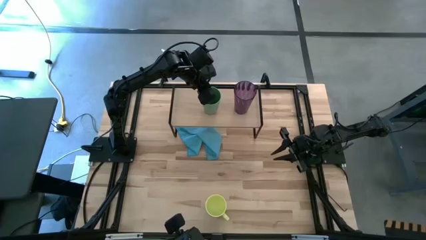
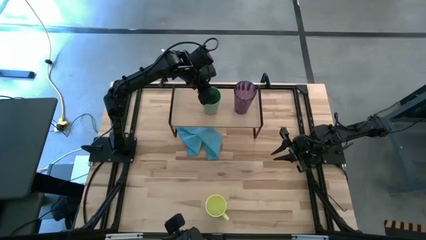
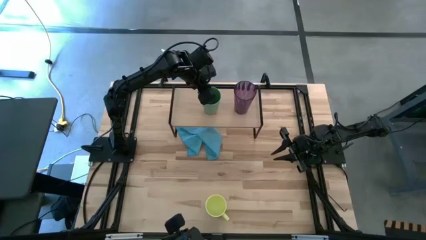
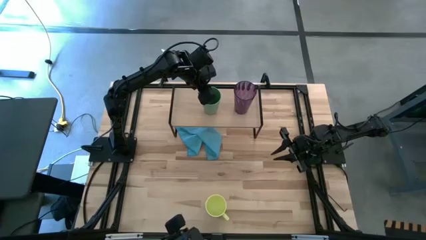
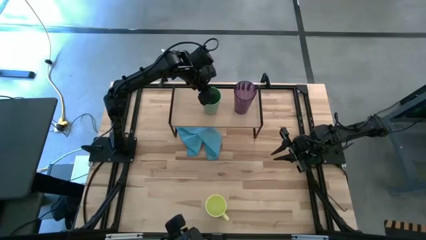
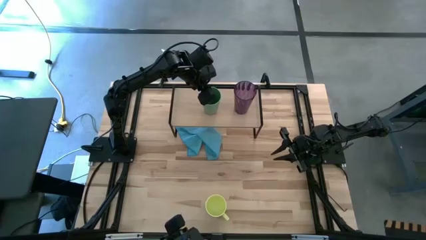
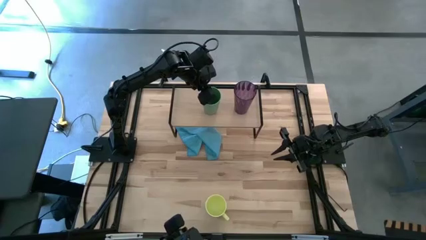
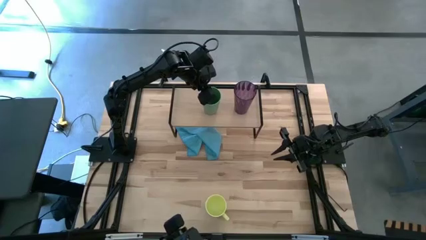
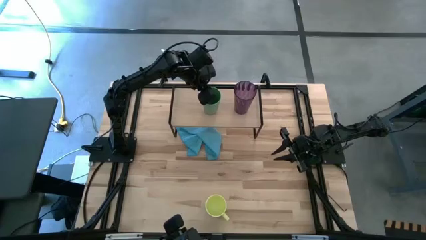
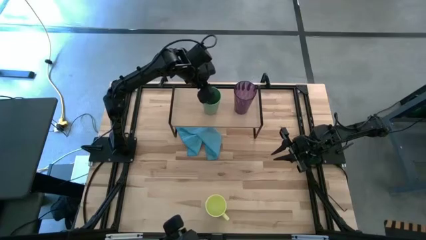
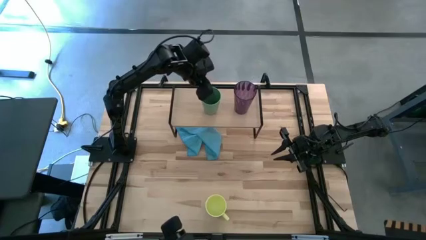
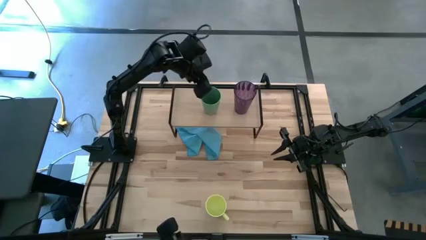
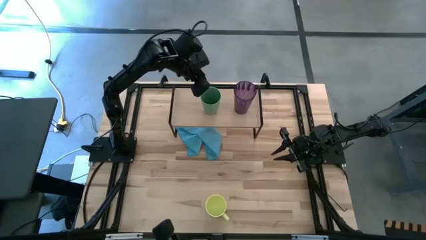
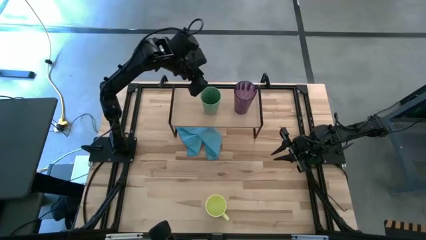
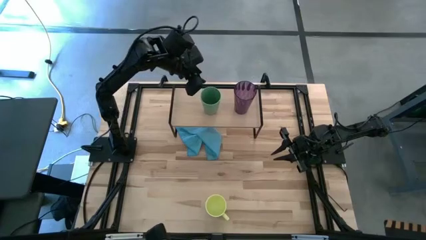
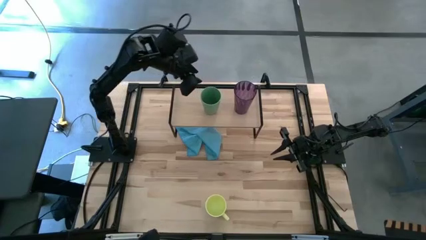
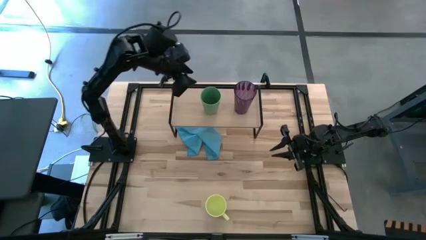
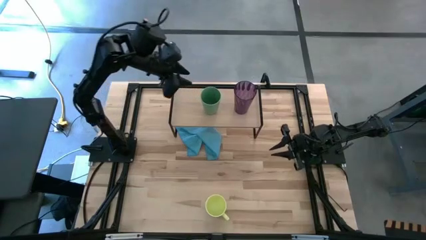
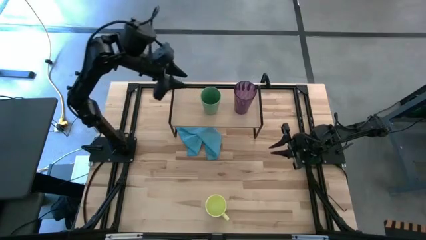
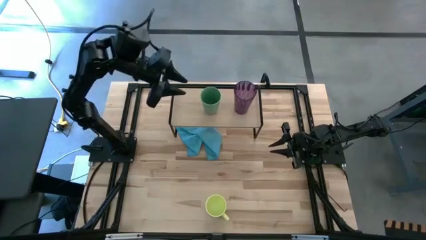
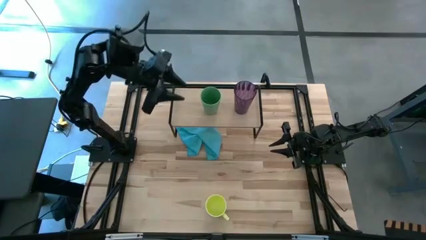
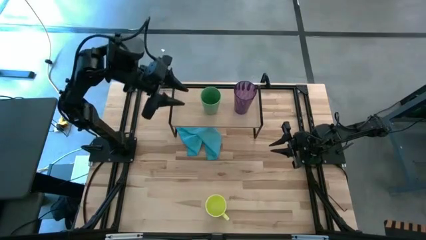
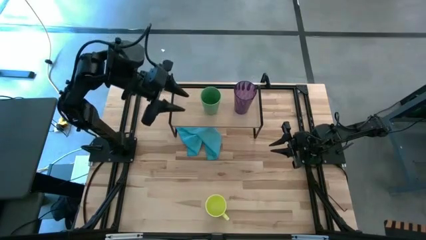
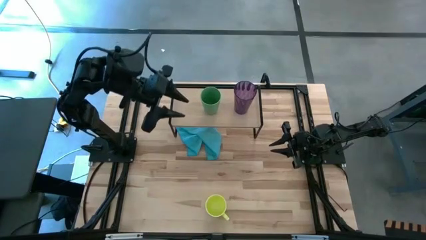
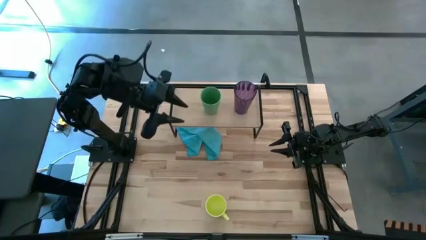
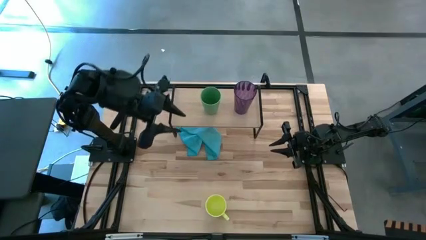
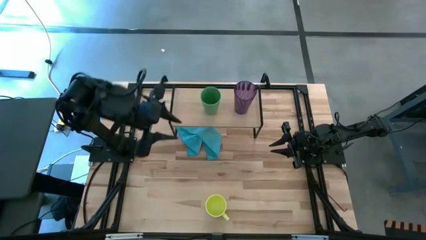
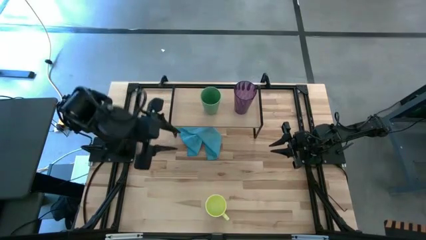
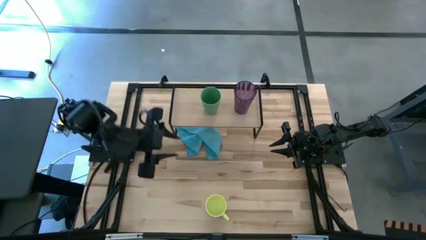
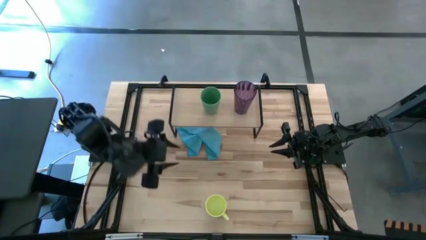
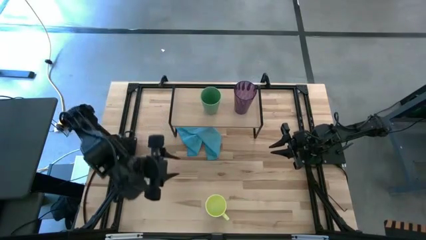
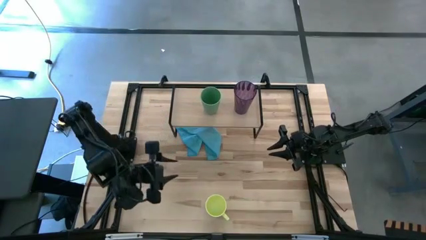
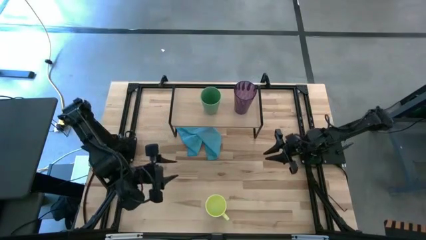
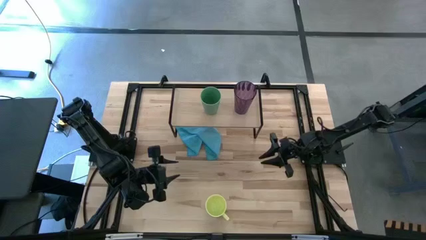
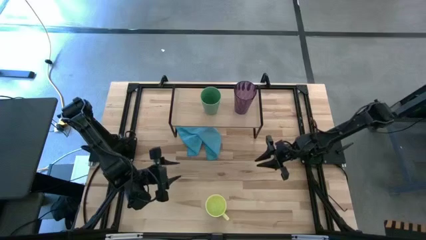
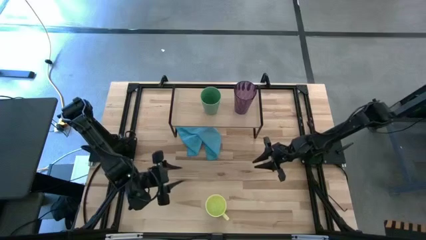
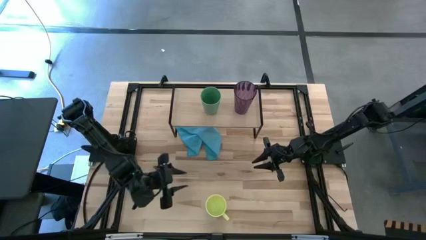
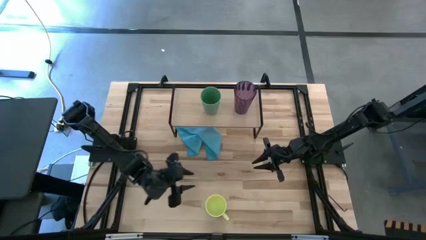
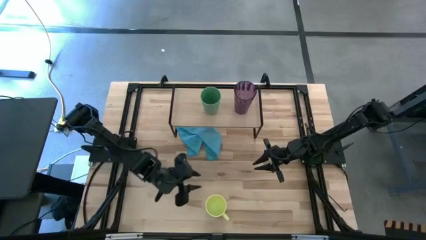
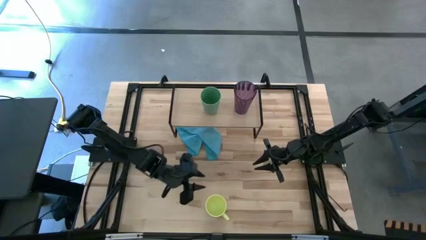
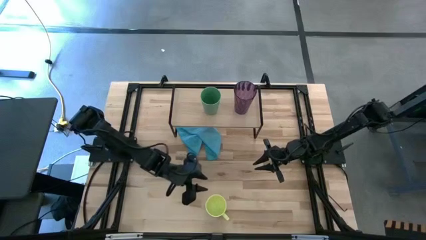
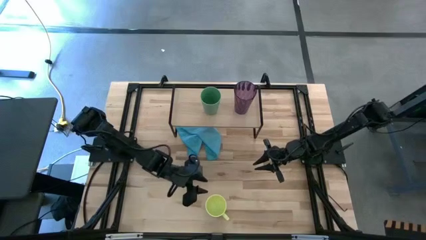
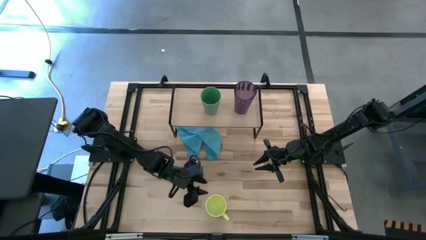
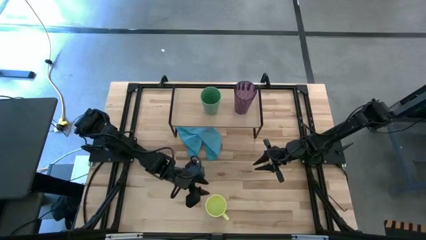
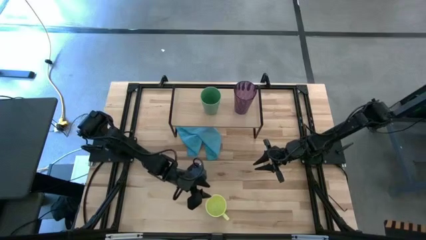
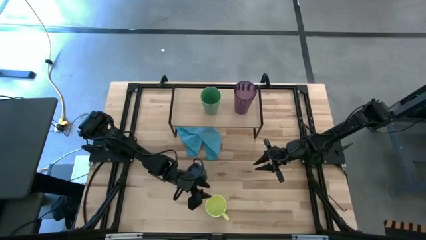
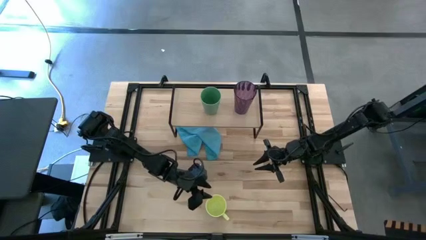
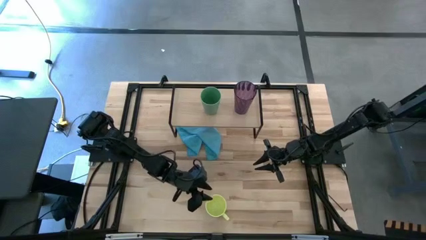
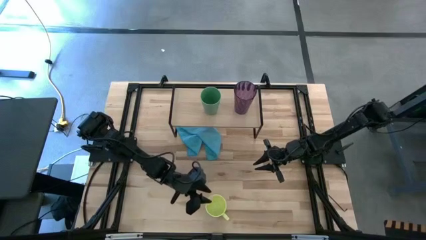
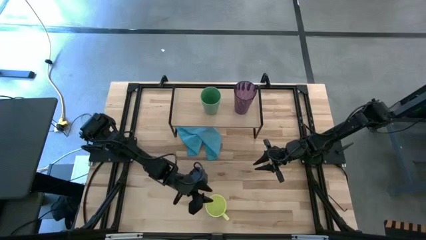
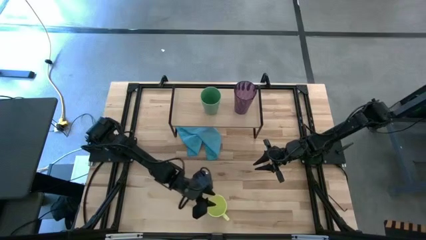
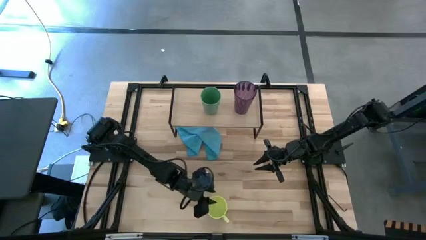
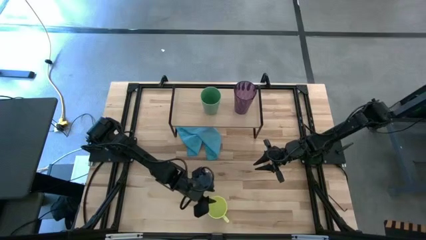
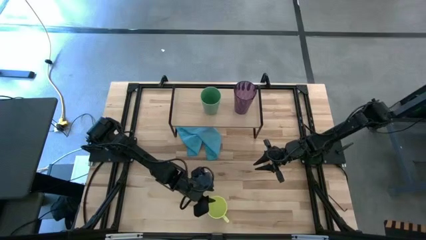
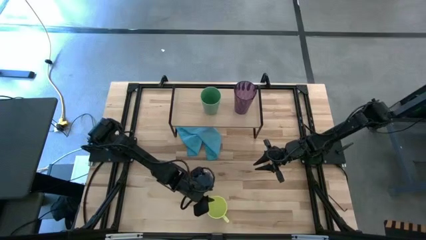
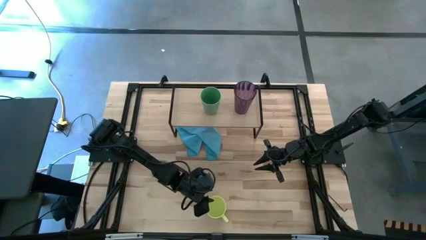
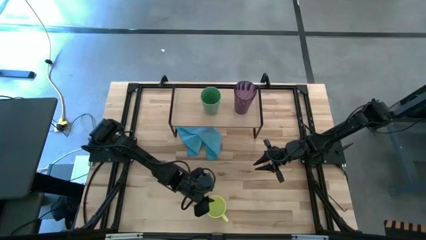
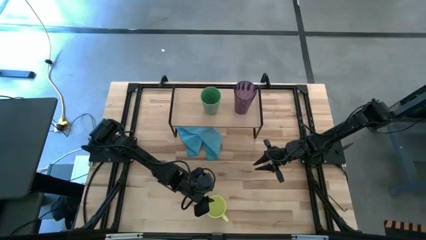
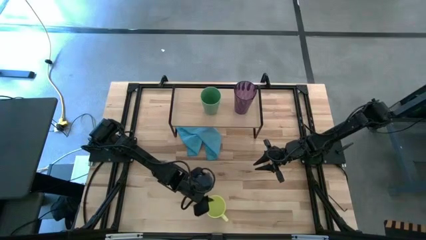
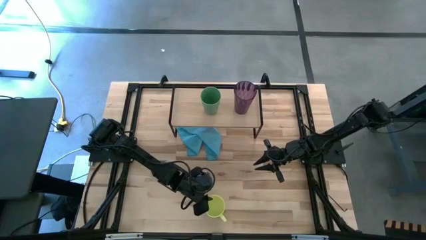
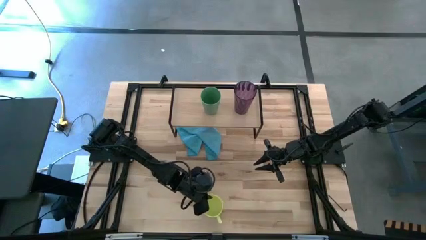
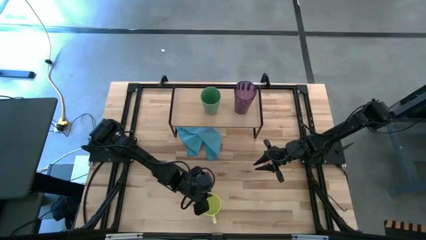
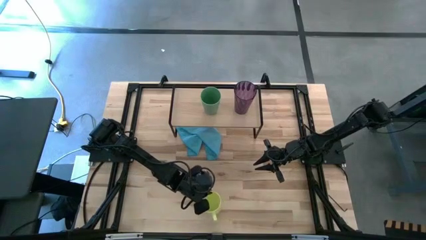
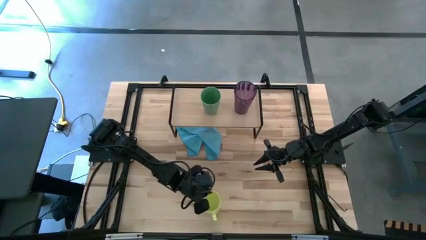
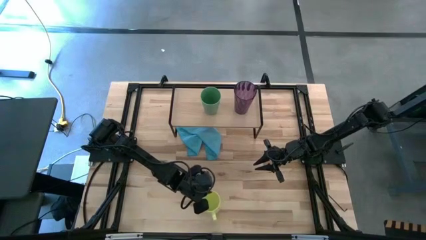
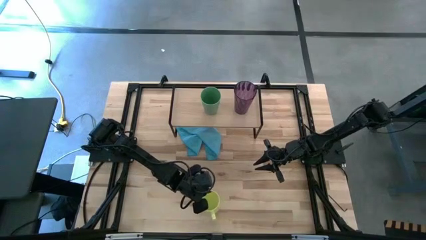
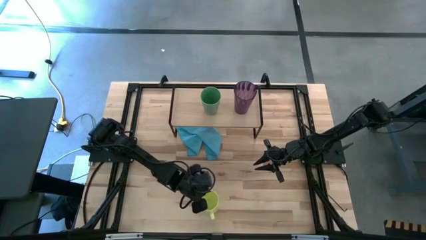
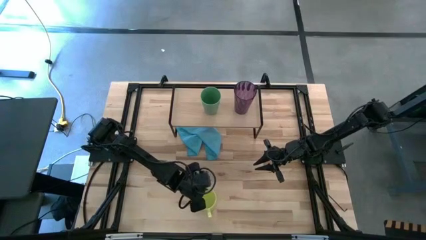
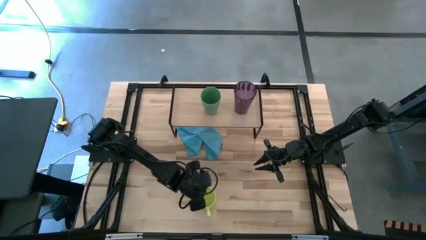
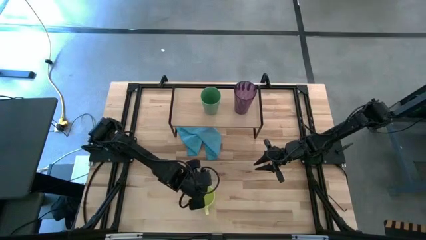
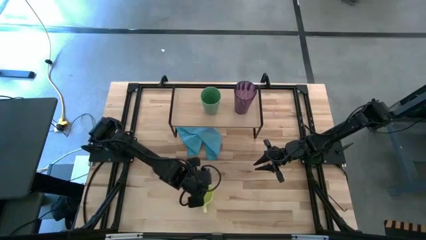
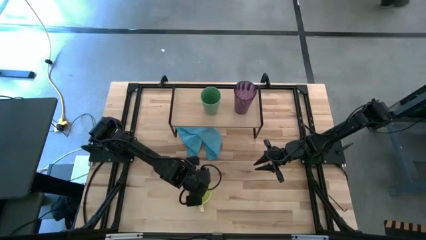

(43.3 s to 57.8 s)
Task: Stack small to large cups/mugs on shelf
Put the yellow cup on the shelf

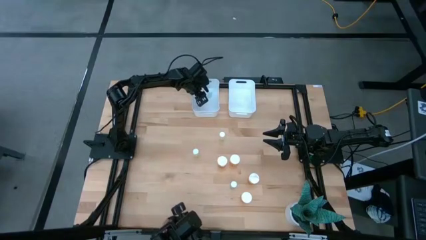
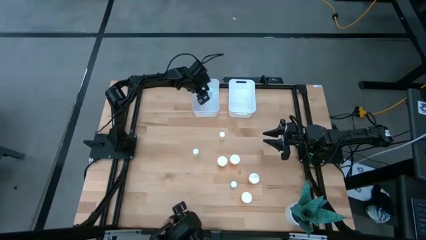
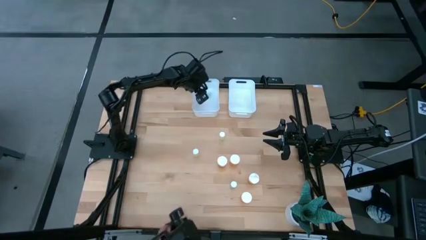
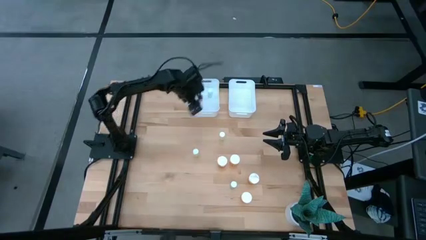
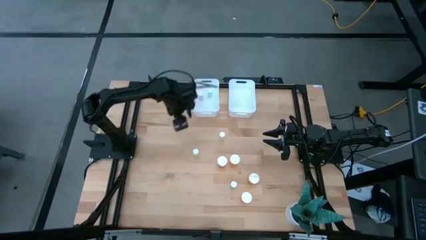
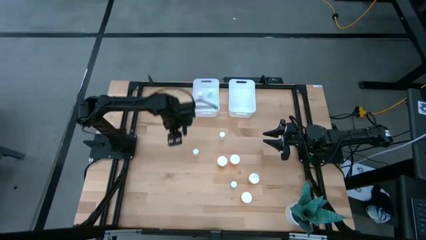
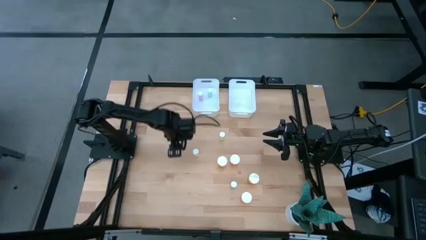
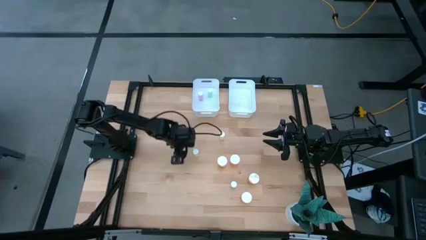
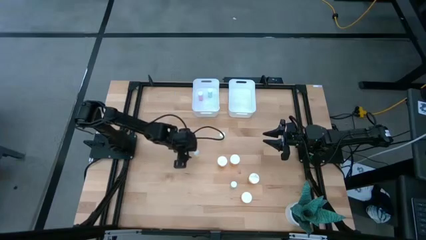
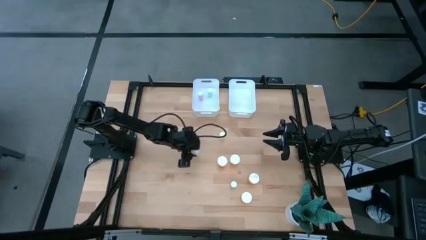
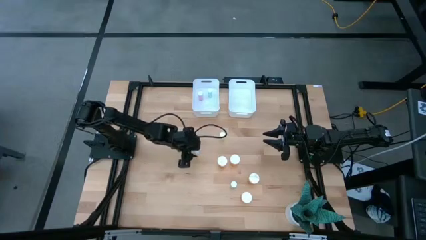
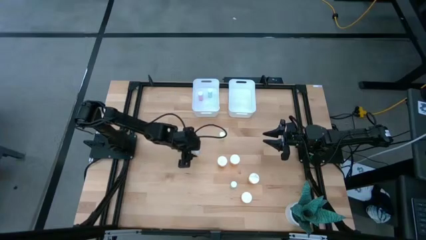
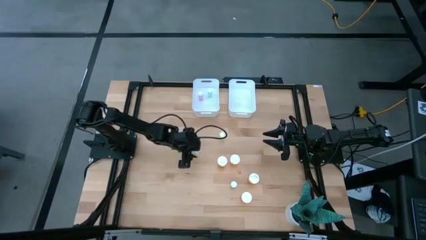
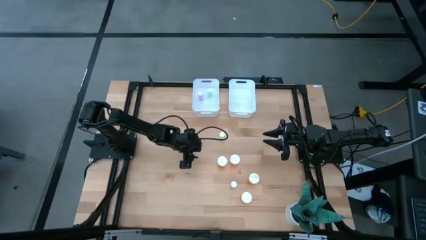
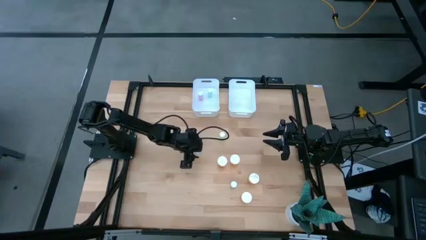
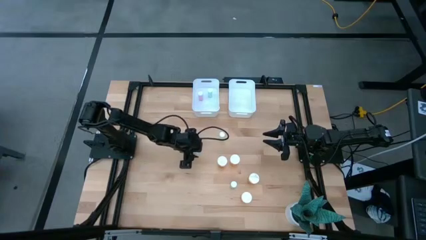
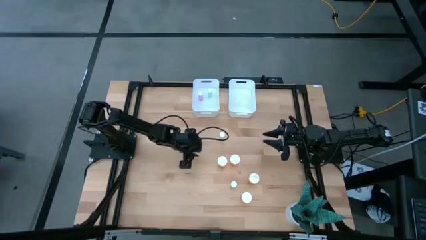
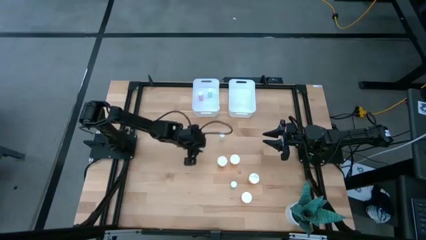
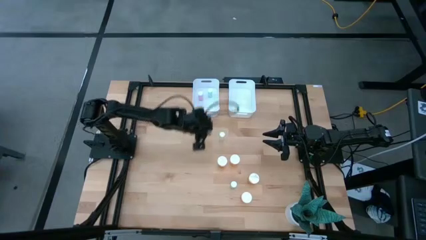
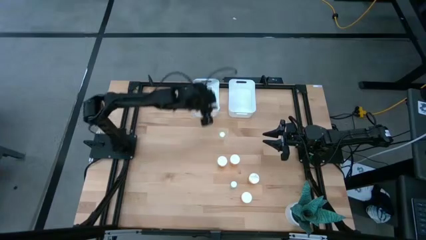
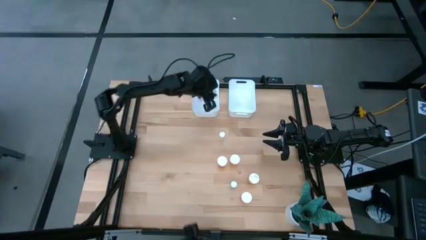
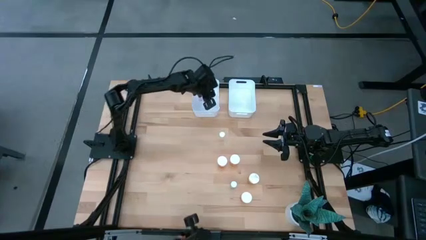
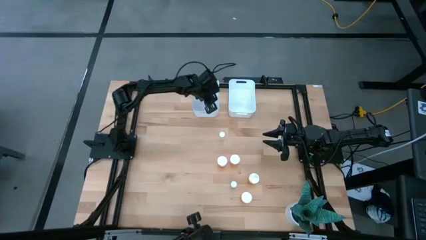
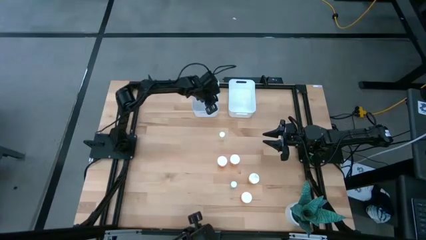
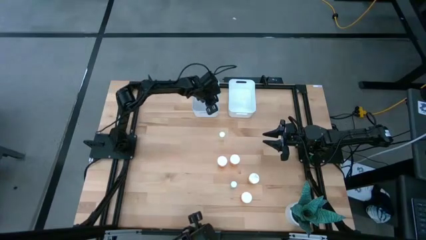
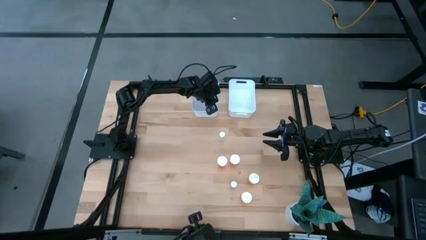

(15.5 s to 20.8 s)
Task: Pick and place medicine bottles into bin by pill shape (circle, oval)
Put the bottom yellow tablet bottle into the white left bin
